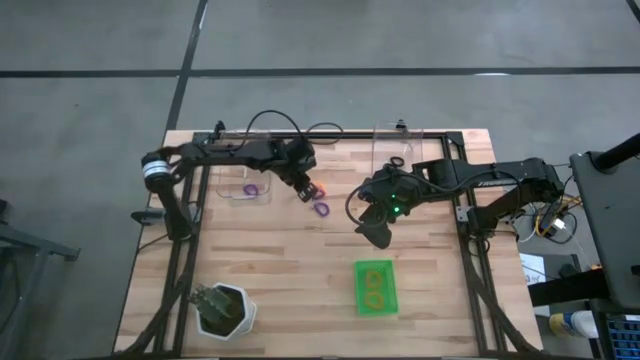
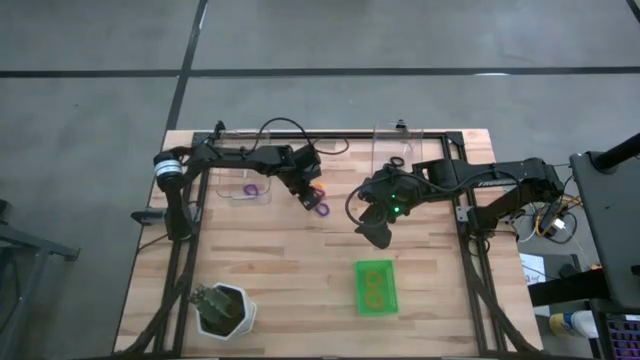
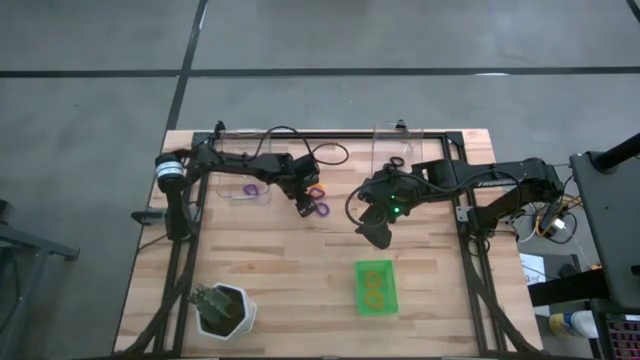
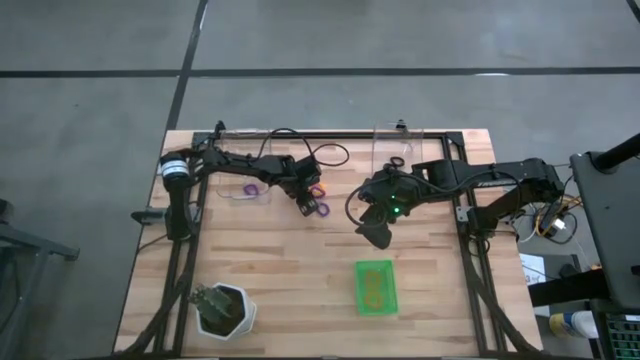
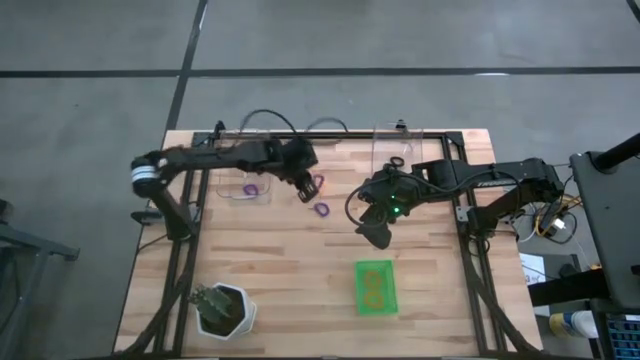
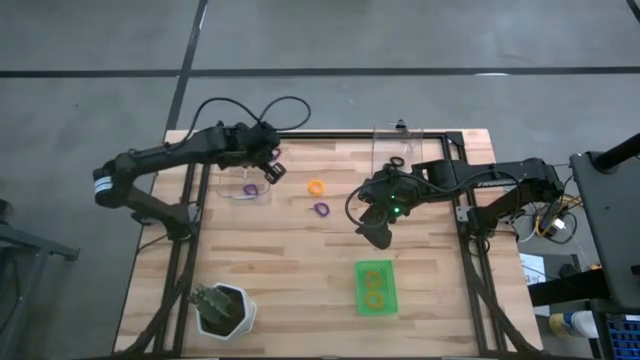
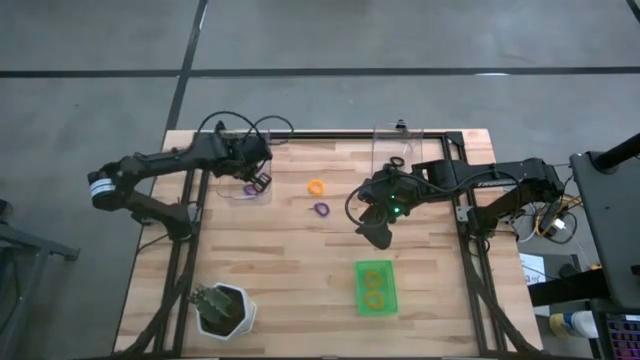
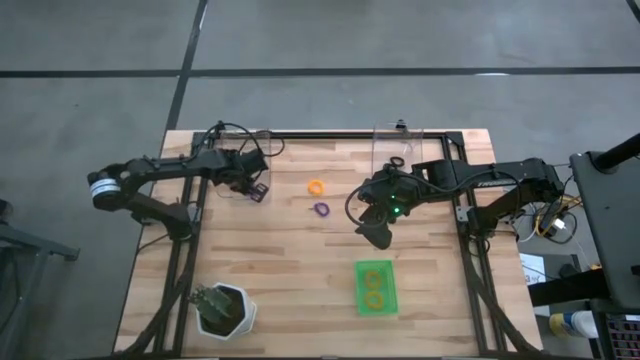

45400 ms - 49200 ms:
Task: Sort spring keychains
Put the top purple spring keychain into the left transparent bin

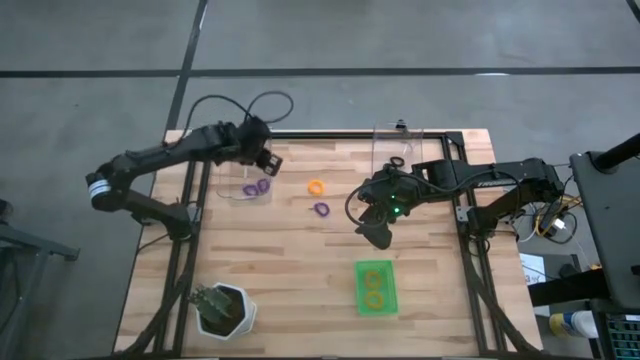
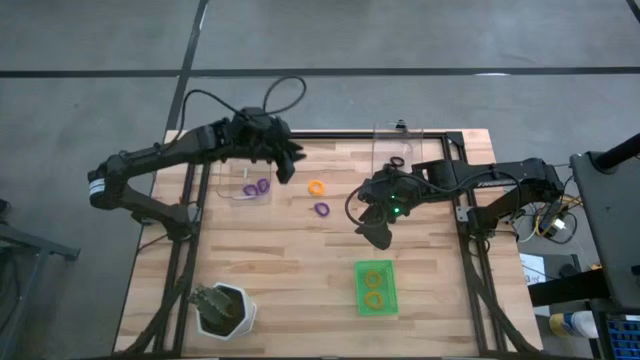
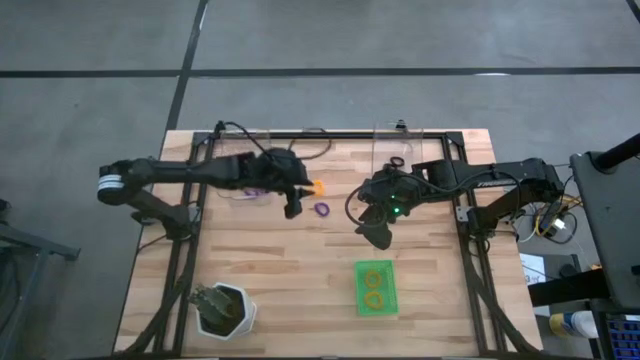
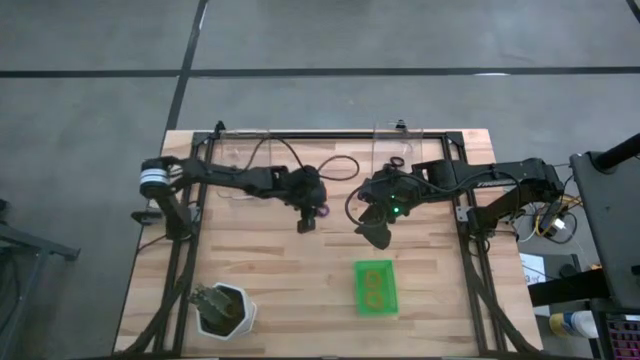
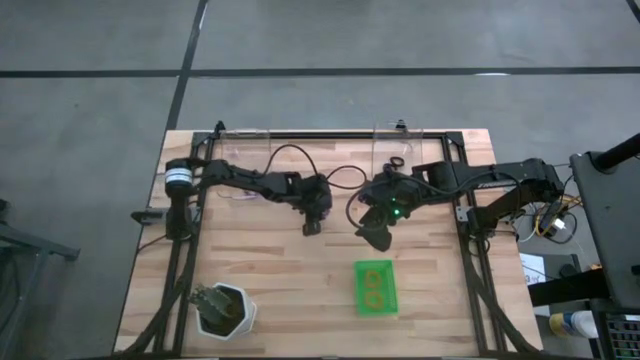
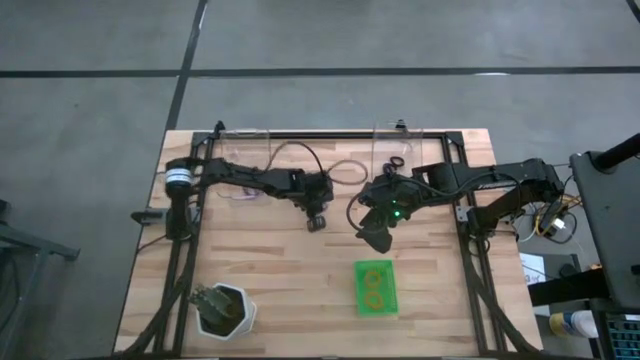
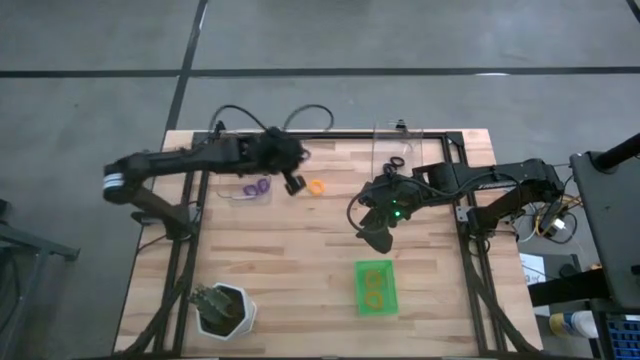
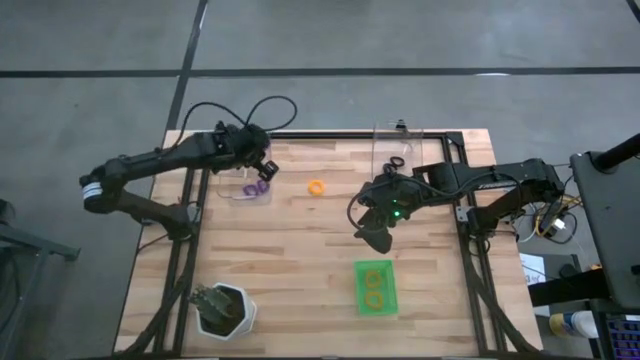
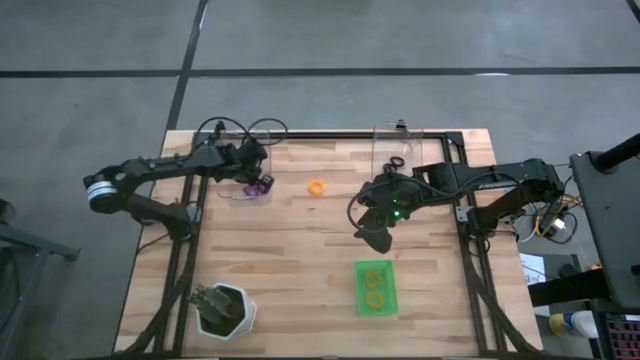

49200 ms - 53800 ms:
Put the purple spring keychain into the left transparent bin

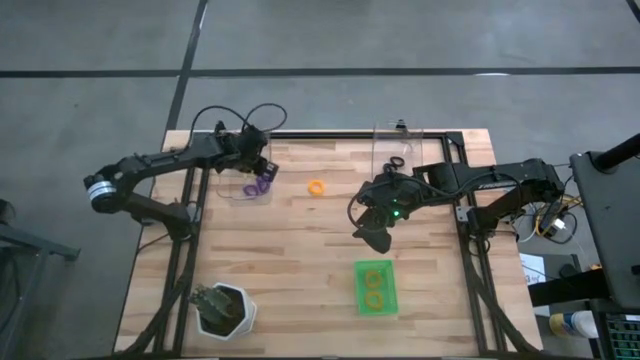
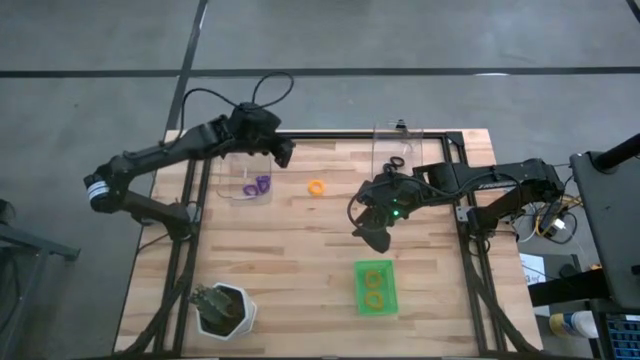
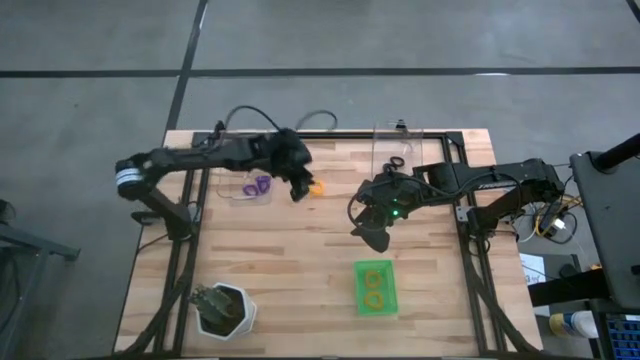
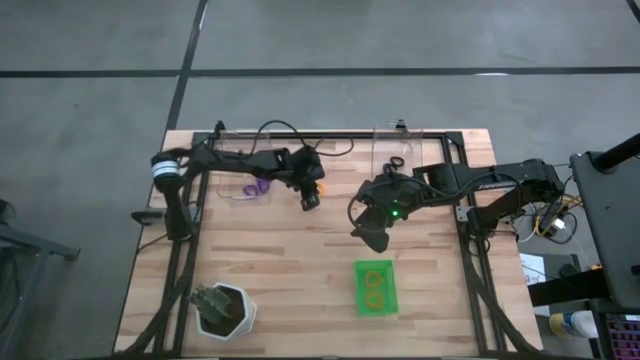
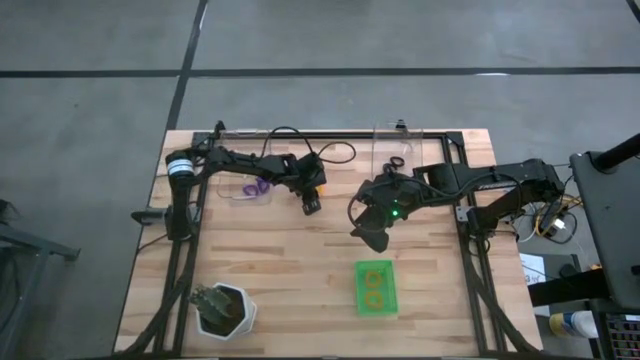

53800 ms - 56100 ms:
Put the yellow spring keychain into the green bin

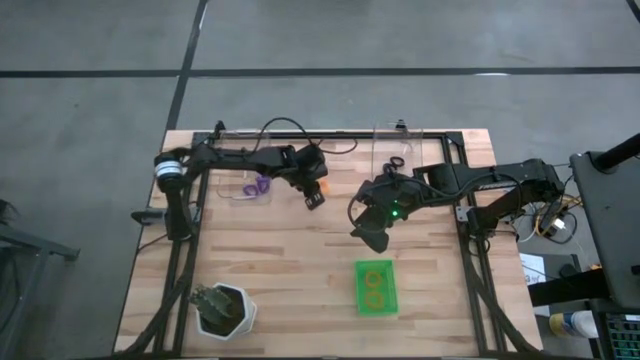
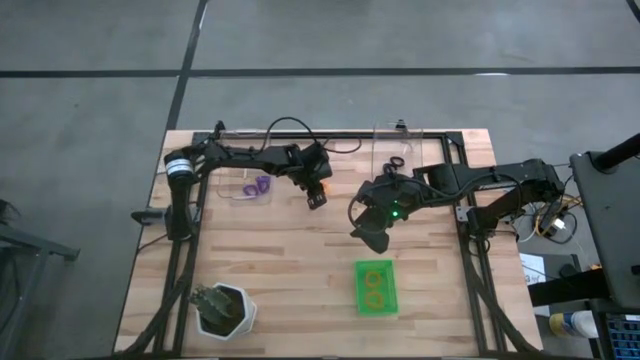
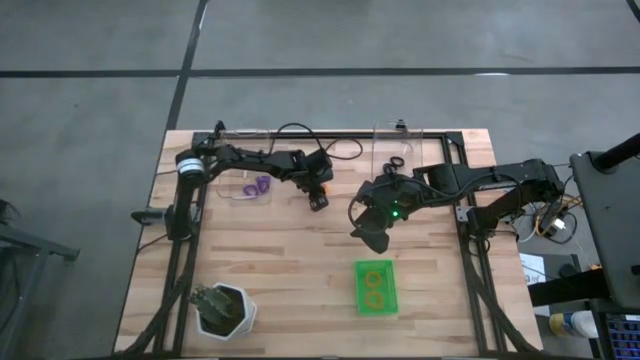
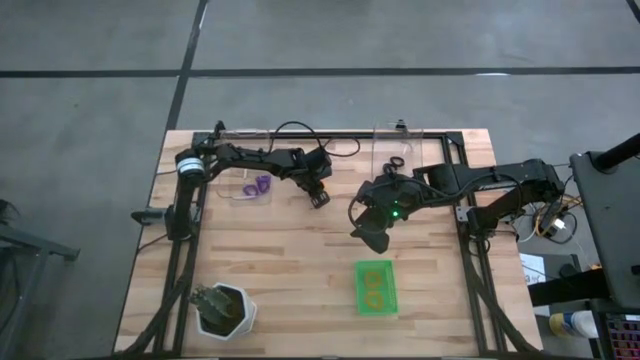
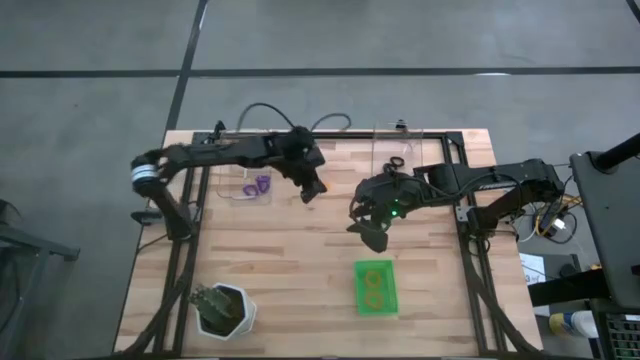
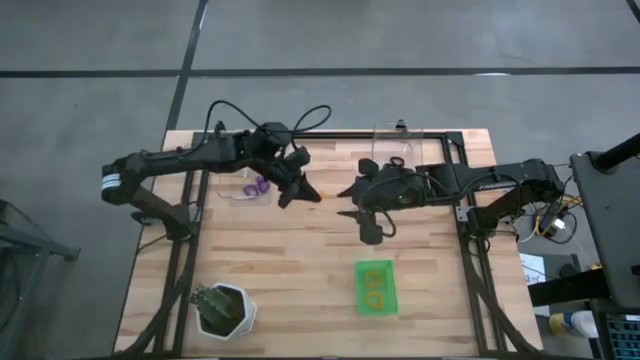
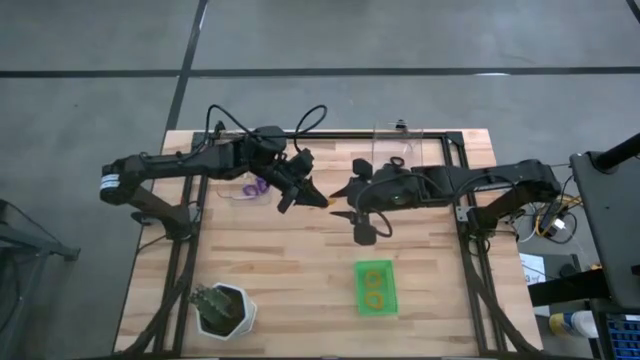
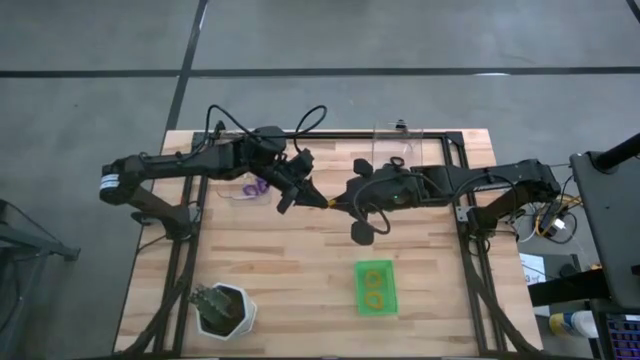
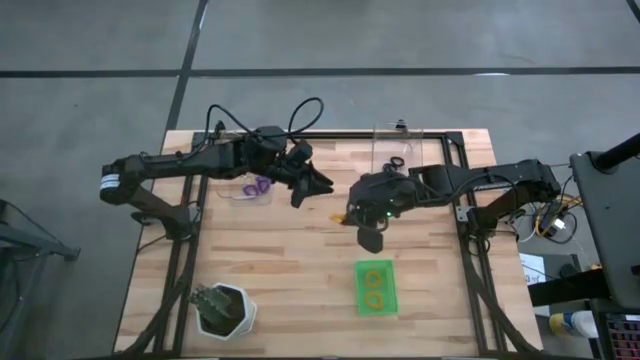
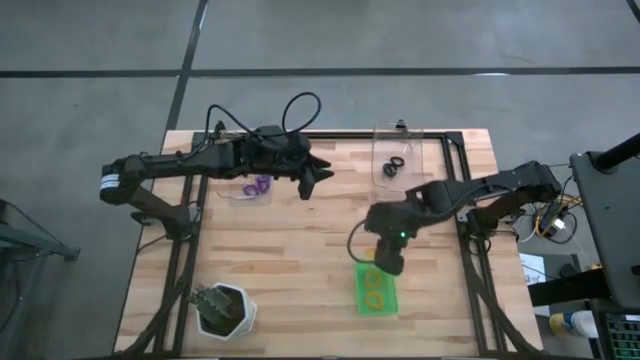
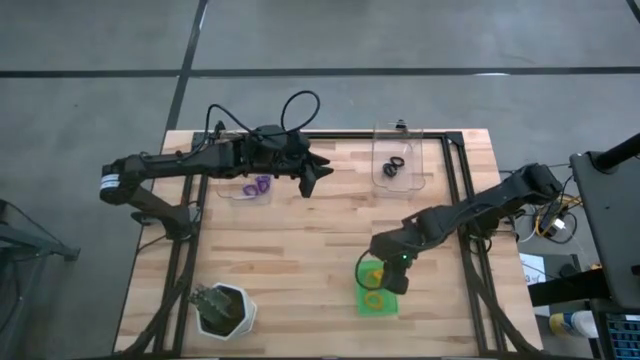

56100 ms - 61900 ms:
Put the yellow spring keychain into the green bin

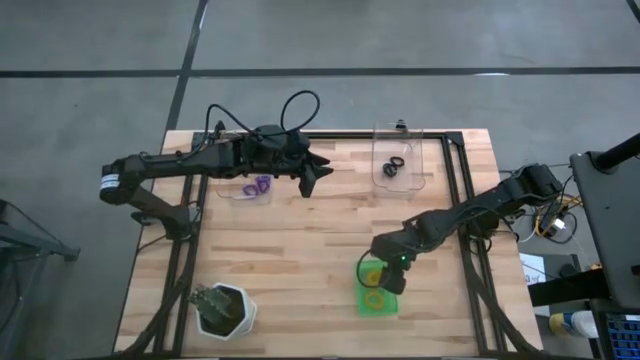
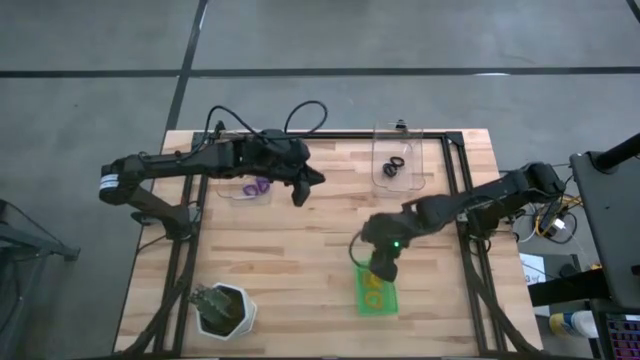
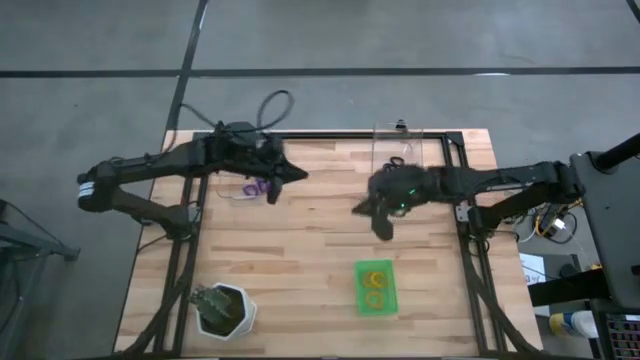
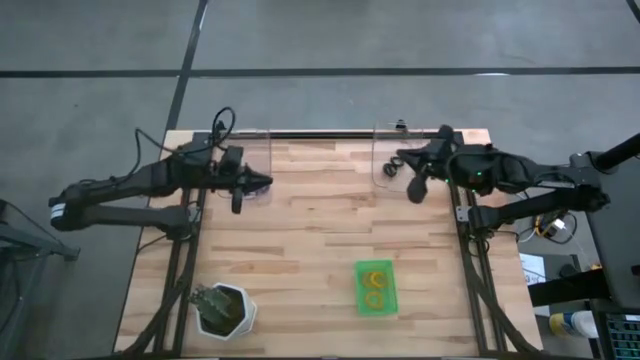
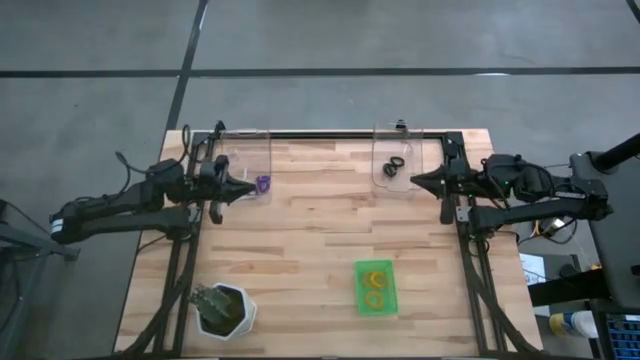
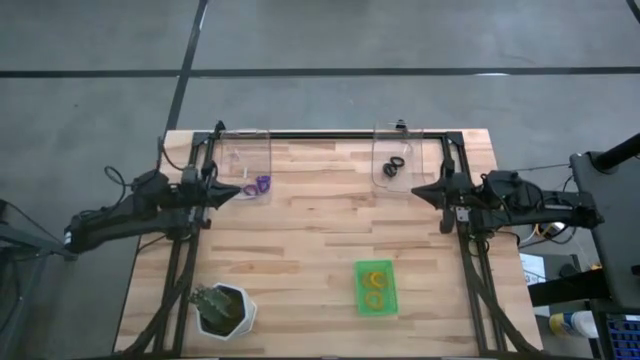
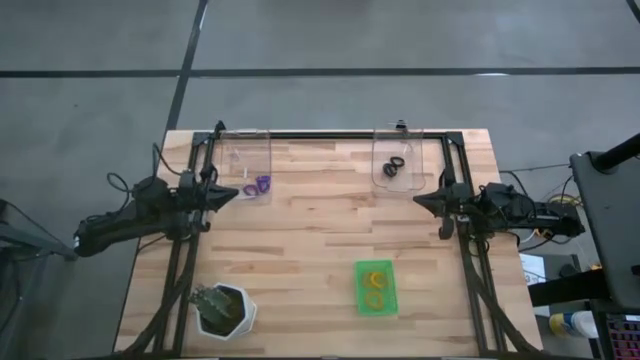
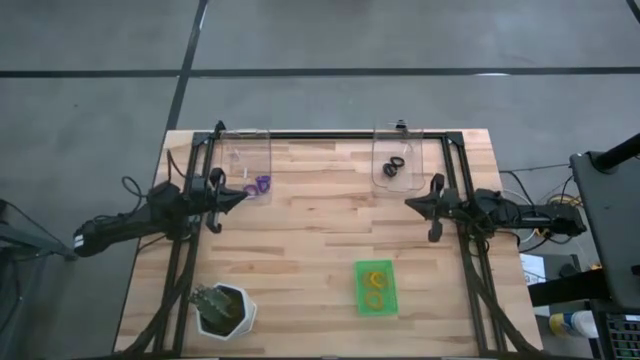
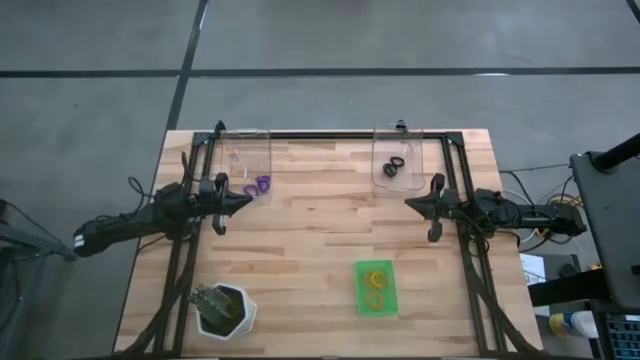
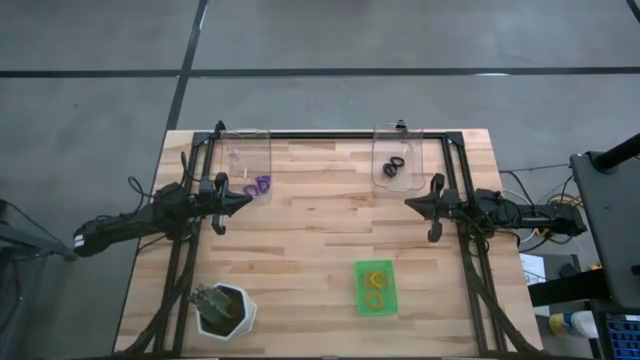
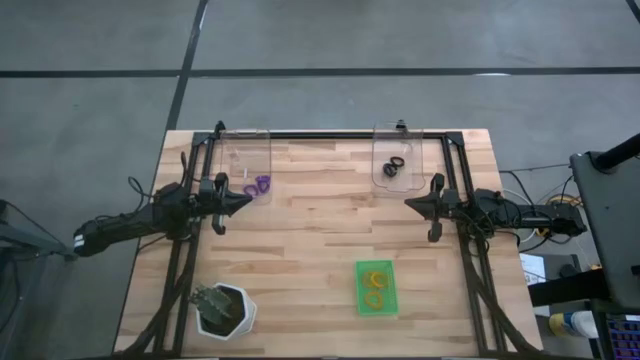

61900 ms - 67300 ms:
Return to Home Position

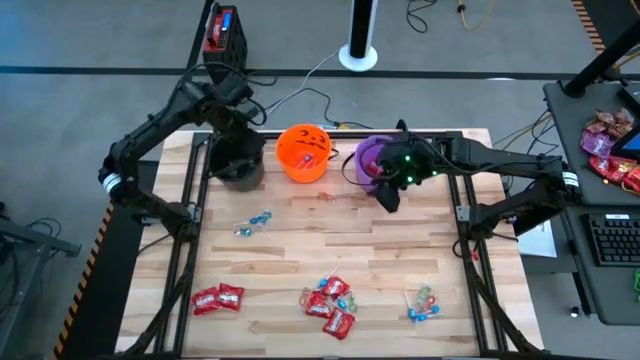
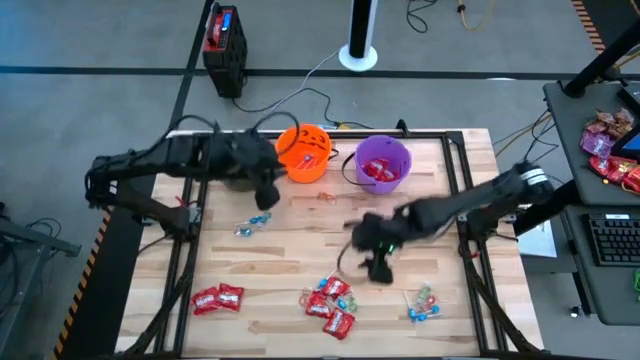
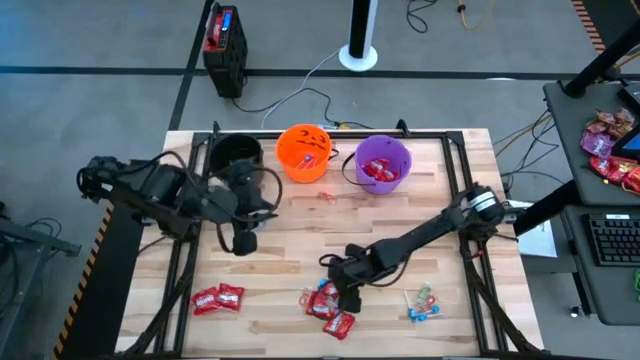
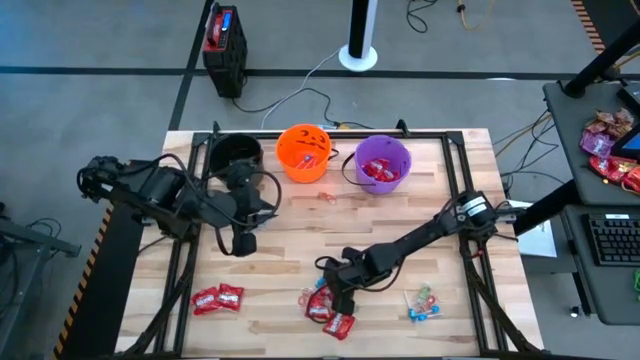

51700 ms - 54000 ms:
Task: Sort candy by brand, put in halloween buckets
Put the red candy into the violet bucket
